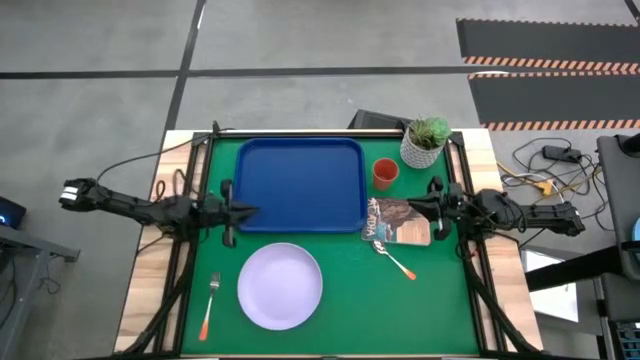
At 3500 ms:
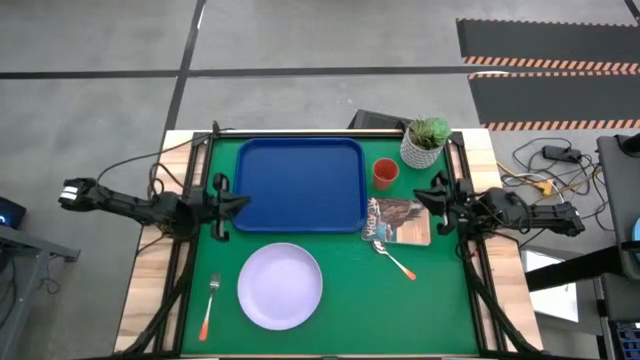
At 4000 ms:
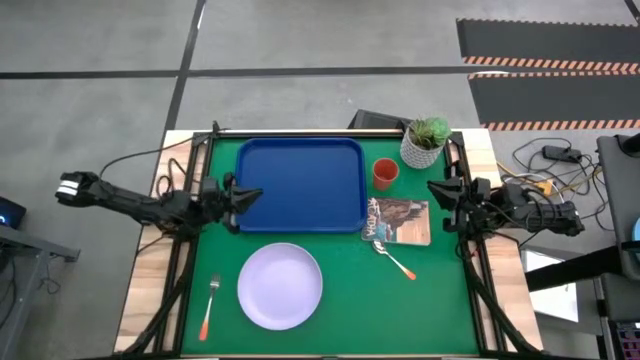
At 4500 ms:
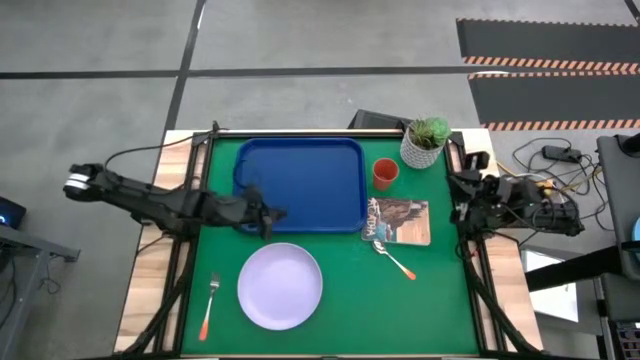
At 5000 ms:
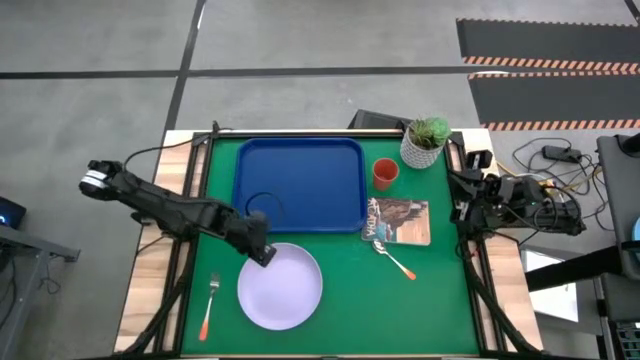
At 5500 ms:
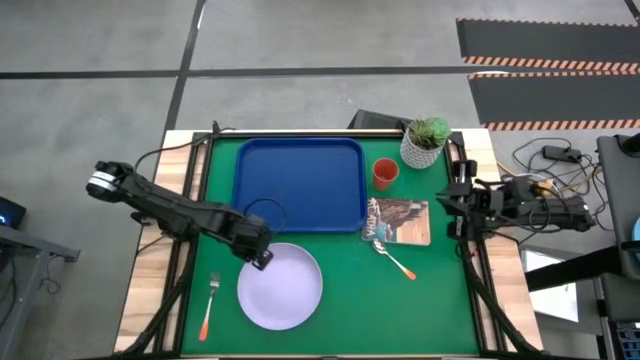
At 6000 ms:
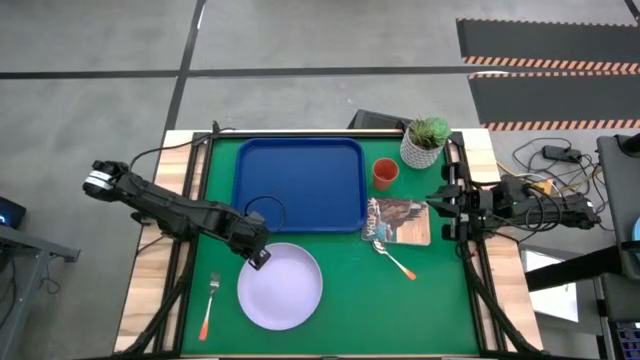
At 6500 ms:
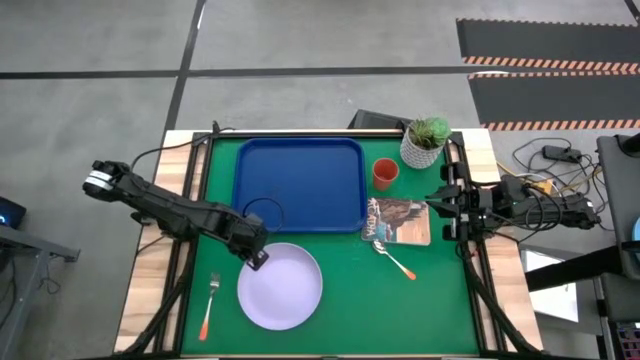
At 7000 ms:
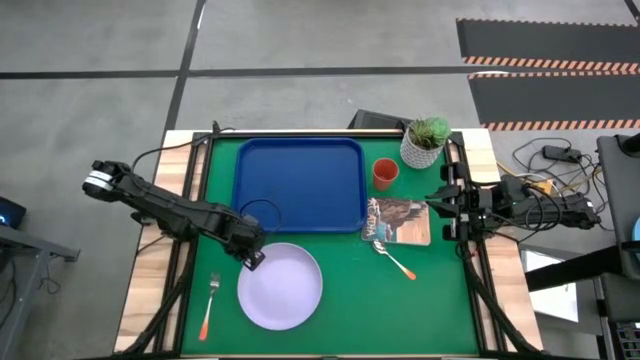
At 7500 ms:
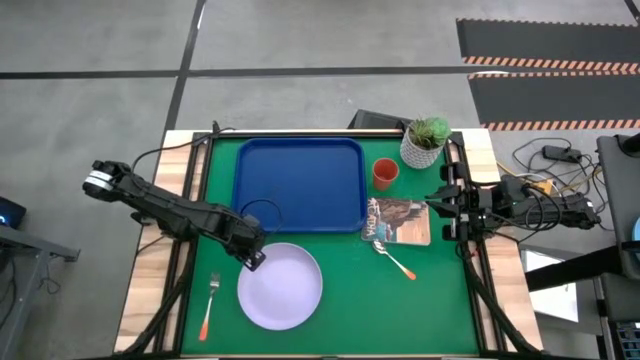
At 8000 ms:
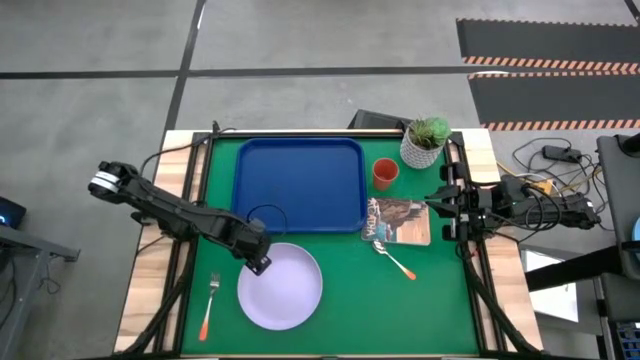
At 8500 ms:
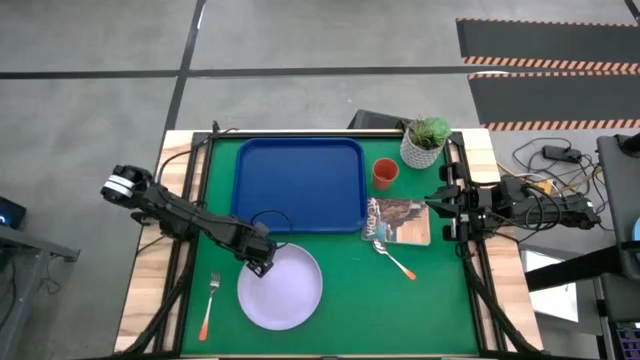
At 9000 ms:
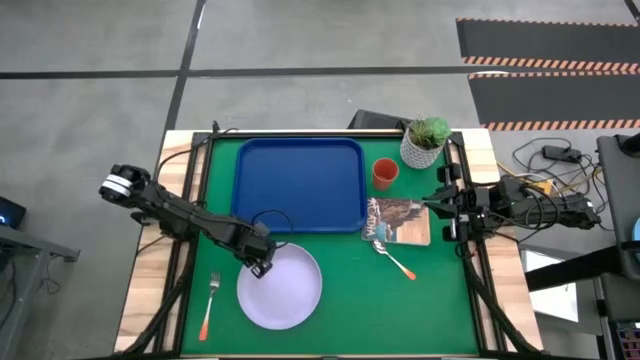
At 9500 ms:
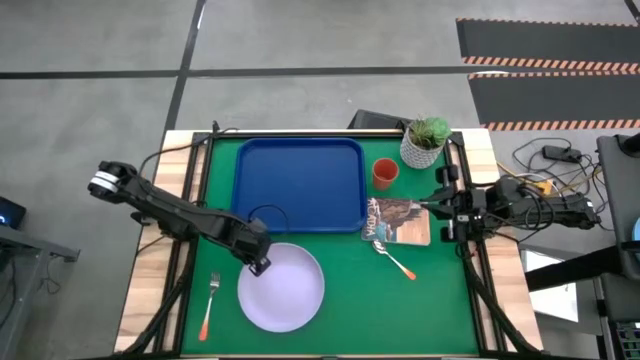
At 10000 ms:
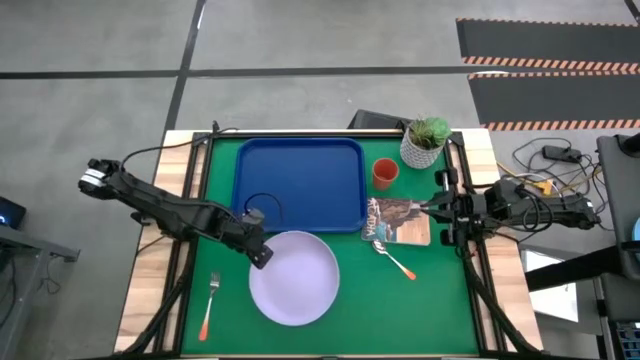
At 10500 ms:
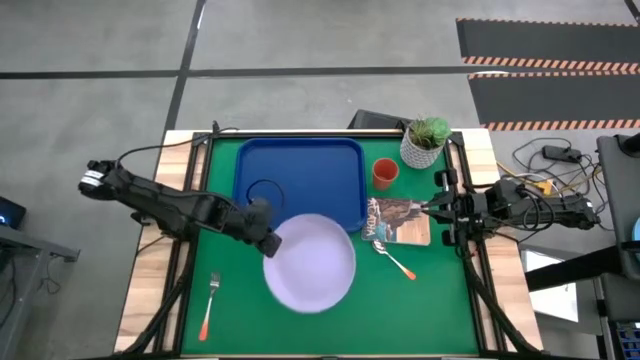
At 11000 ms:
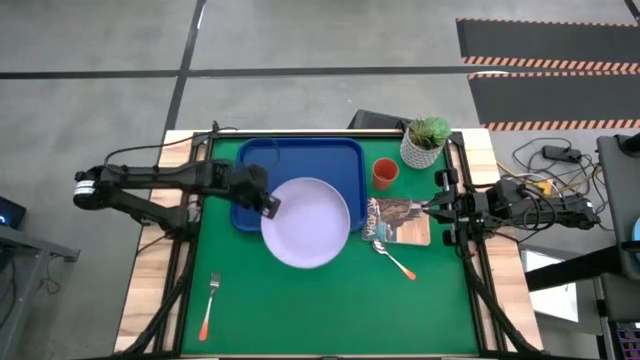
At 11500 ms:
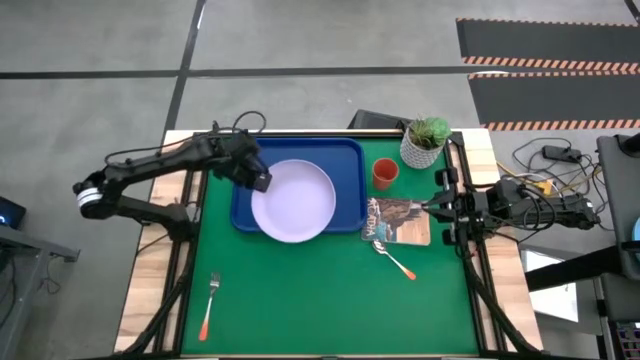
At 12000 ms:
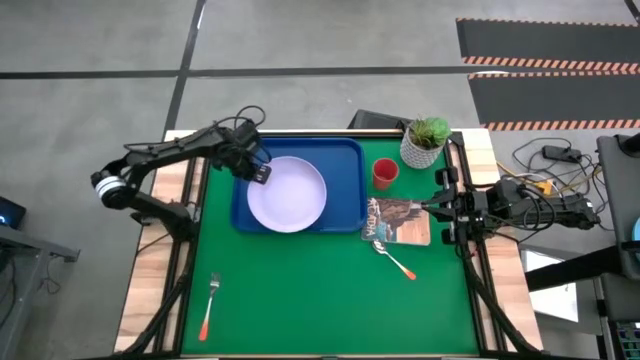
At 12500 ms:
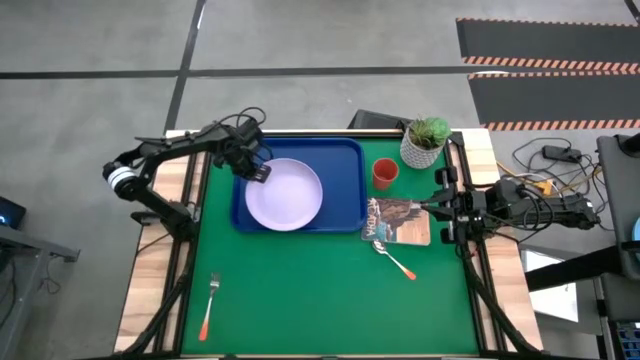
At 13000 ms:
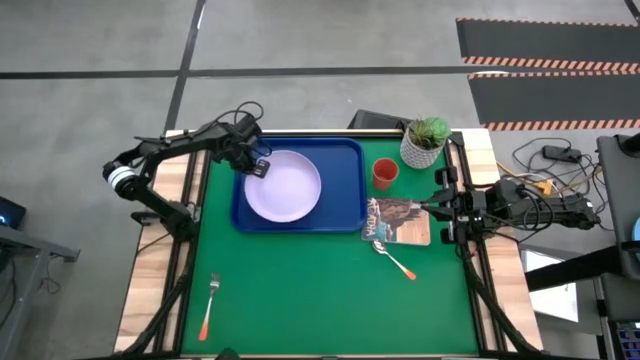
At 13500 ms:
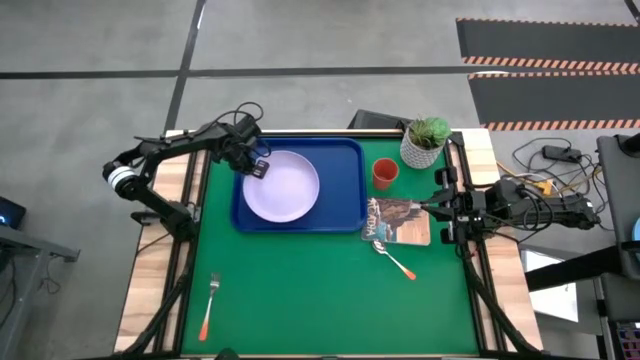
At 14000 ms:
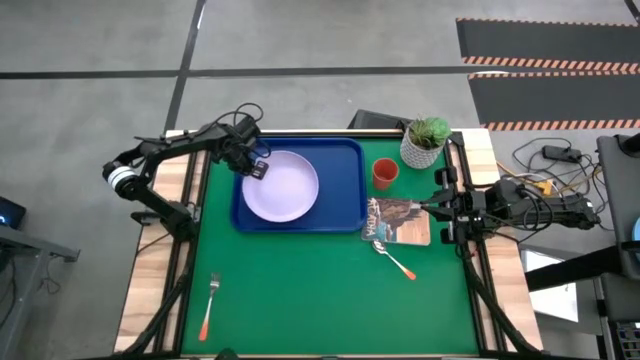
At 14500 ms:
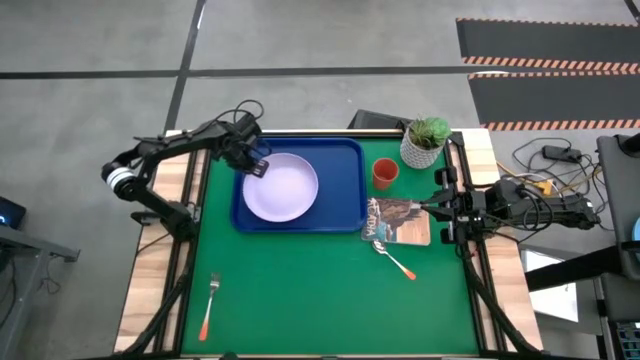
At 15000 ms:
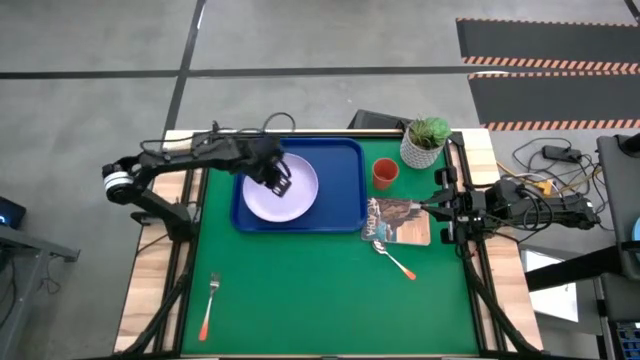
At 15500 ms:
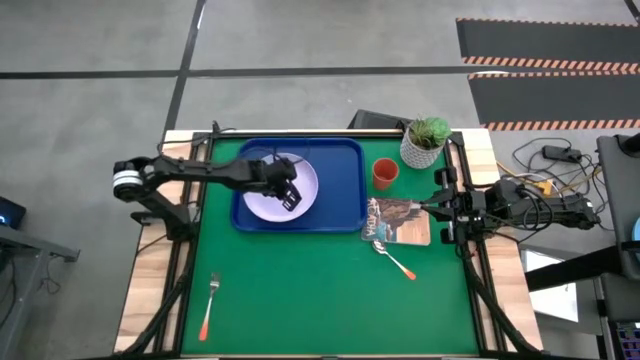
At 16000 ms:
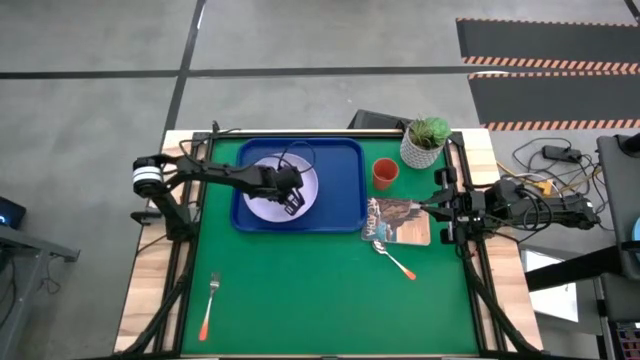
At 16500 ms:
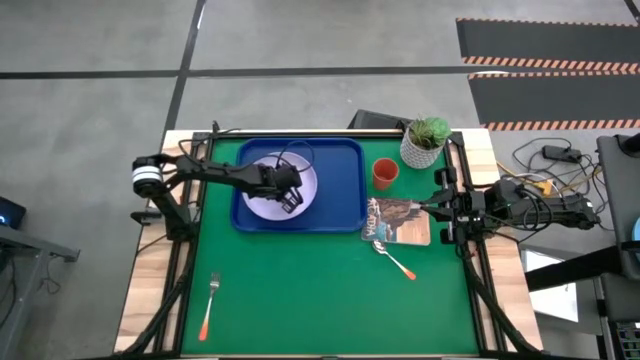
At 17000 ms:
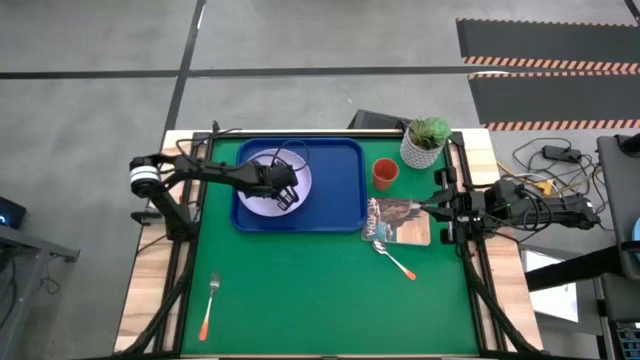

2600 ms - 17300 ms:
Task: Pick and place plate/cup/fork/spoon on tray
Put the white plate on the blue serving tray

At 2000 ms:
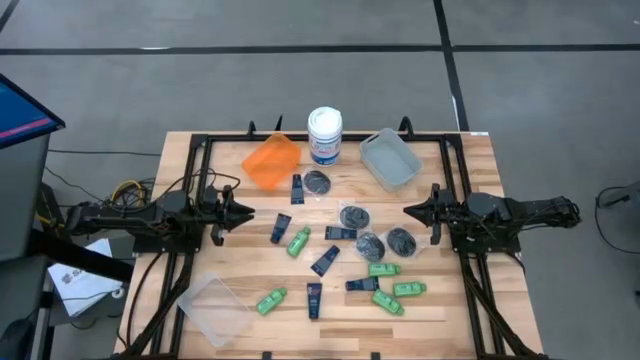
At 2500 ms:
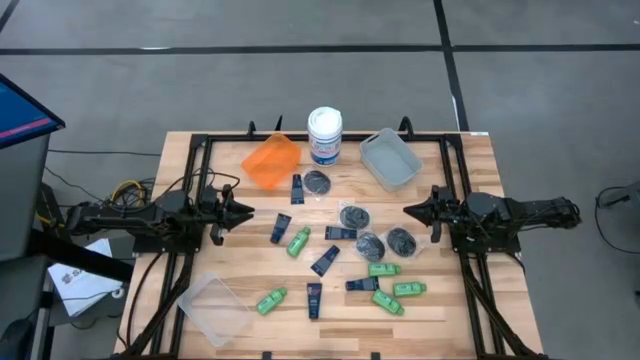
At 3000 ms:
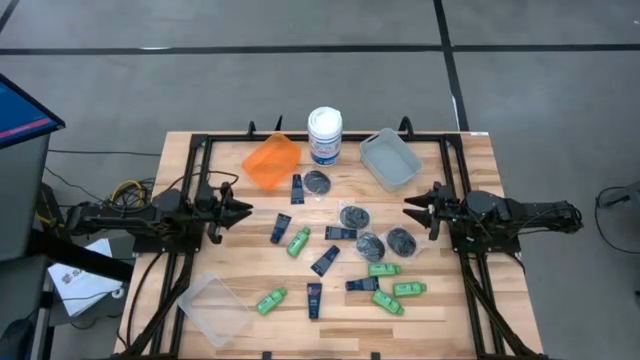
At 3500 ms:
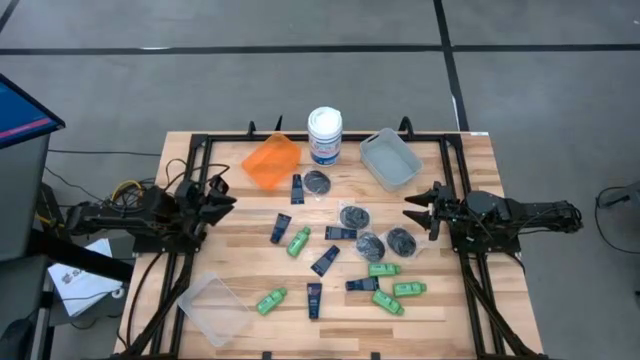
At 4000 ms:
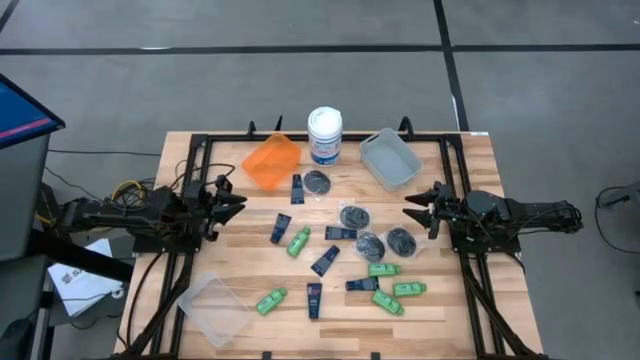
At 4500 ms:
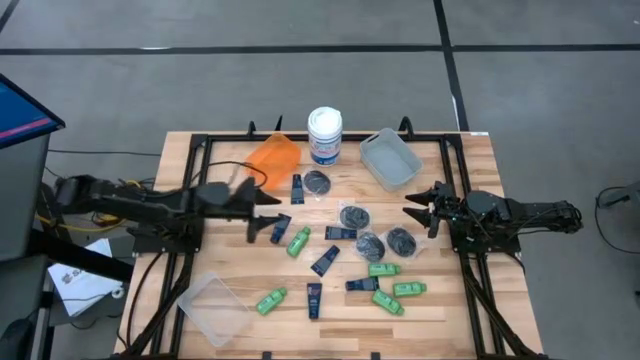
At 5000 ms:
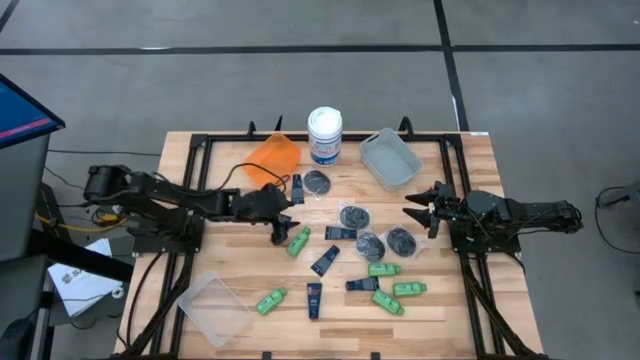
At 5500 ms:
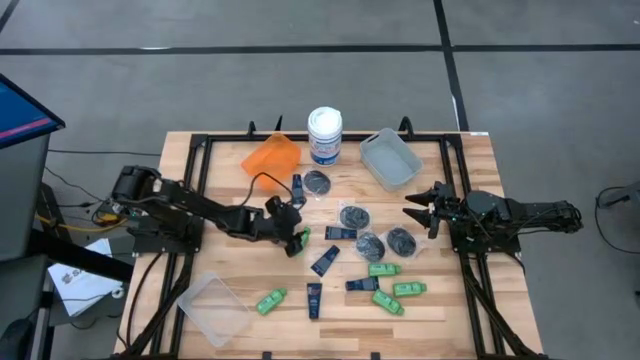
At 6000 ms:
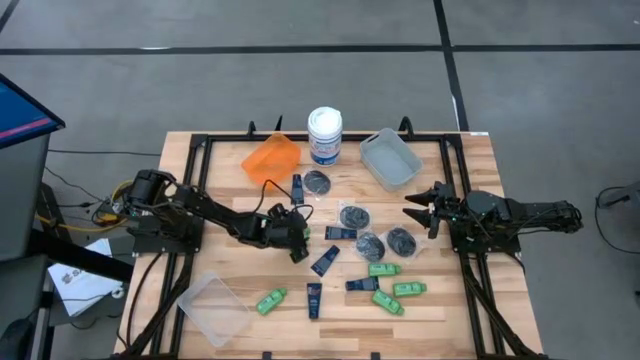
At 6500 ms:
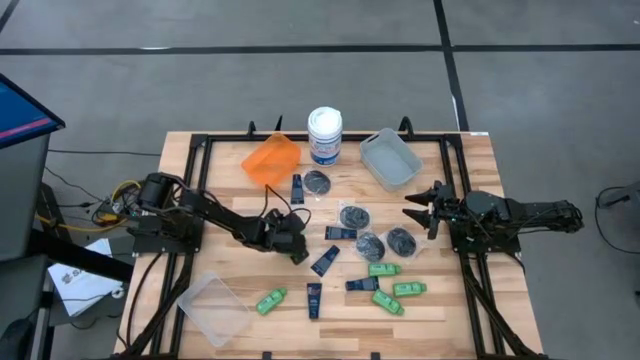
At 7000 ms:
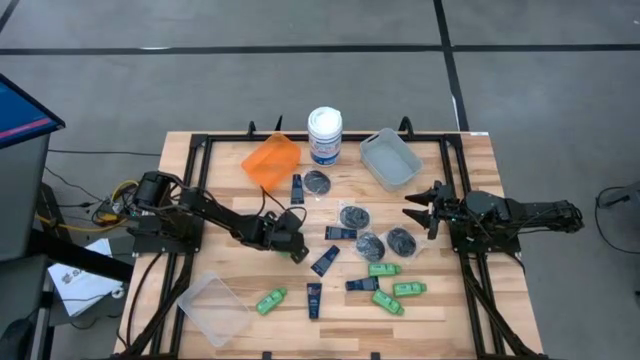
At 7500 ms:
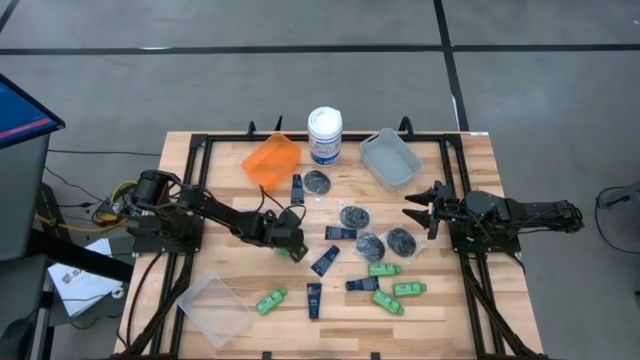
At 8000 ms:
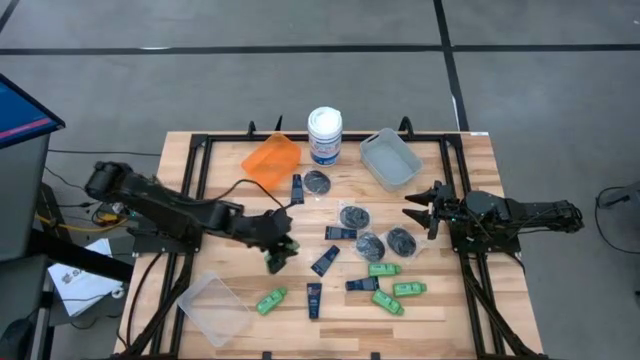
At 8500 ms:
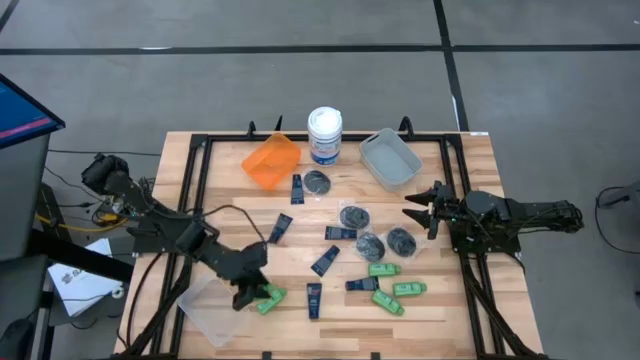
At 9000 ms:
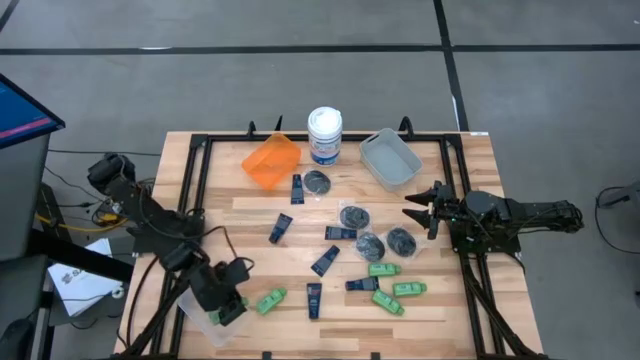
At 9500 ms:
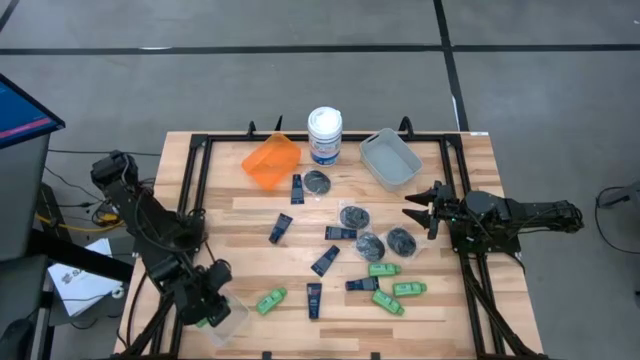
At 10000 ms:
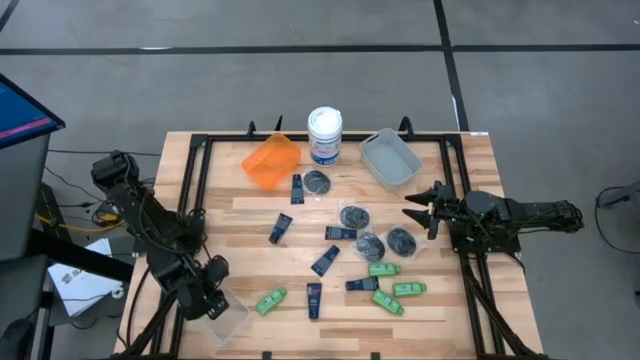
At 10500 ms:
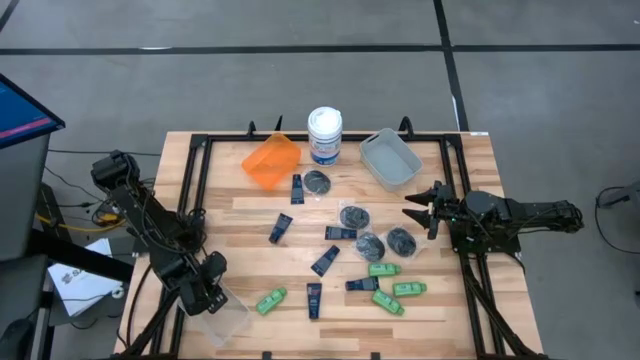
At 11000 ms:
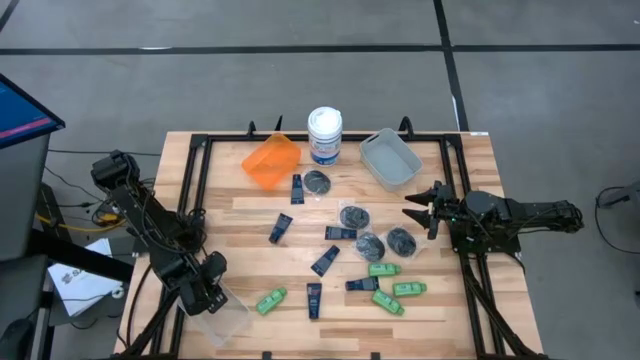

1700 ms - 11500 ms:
Task: Pick & Place Travel size toiletries
Put the shampoo into the white bin
